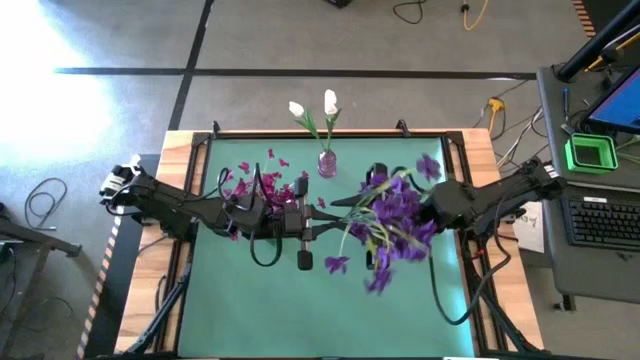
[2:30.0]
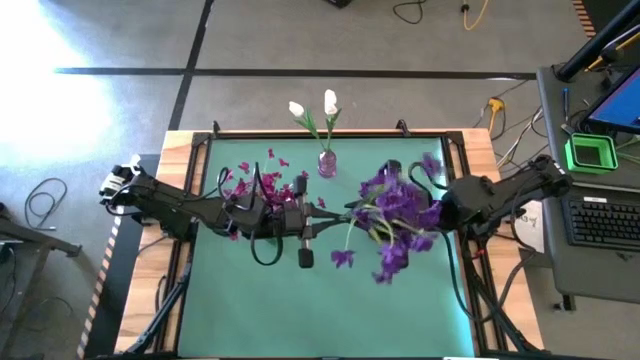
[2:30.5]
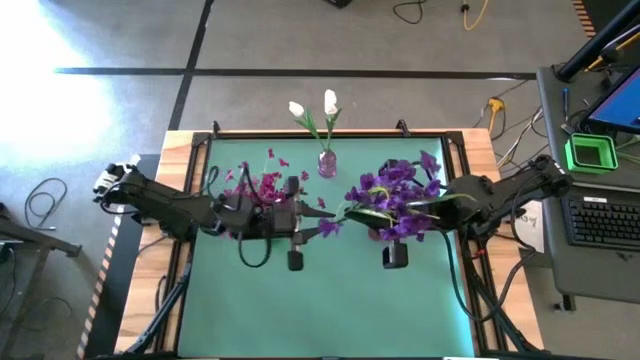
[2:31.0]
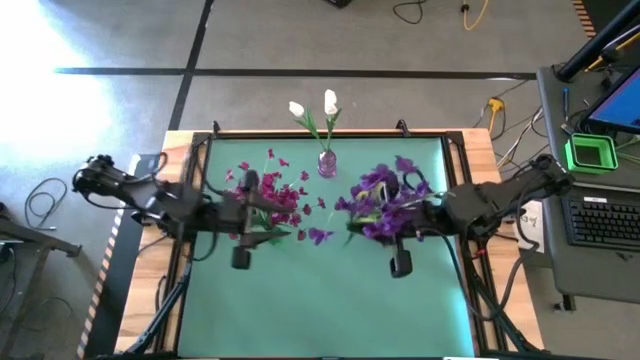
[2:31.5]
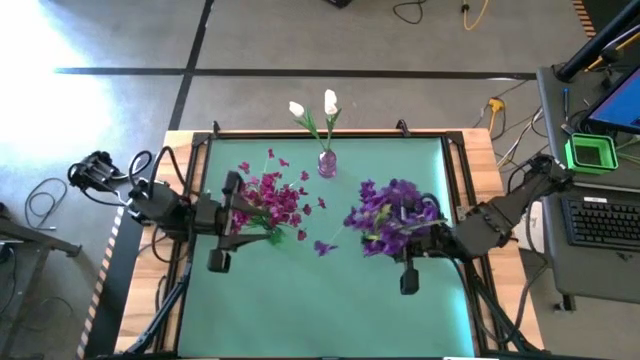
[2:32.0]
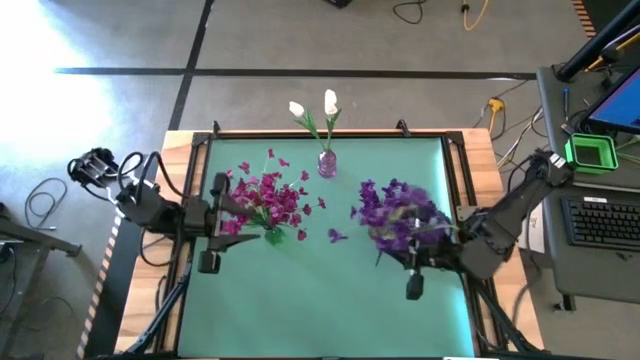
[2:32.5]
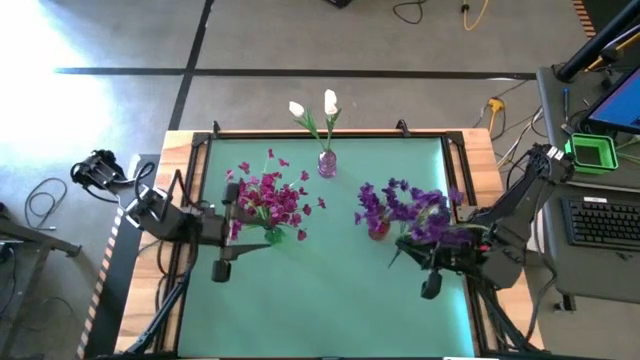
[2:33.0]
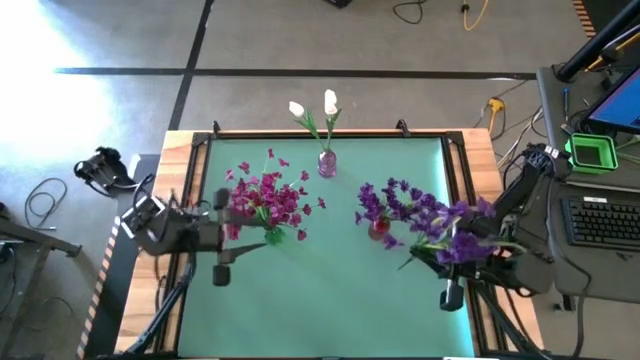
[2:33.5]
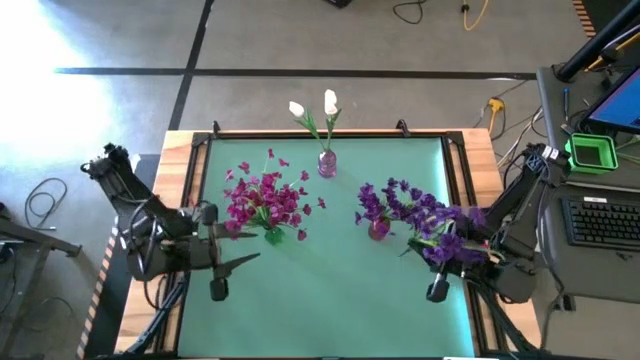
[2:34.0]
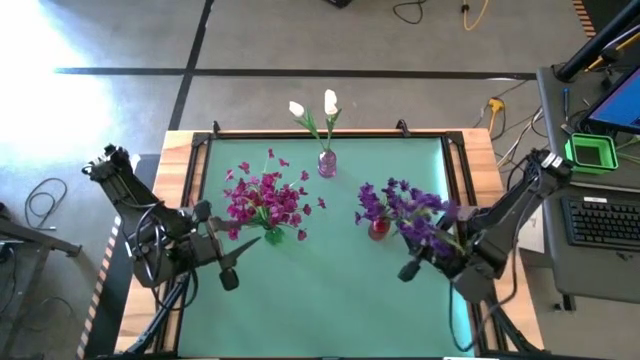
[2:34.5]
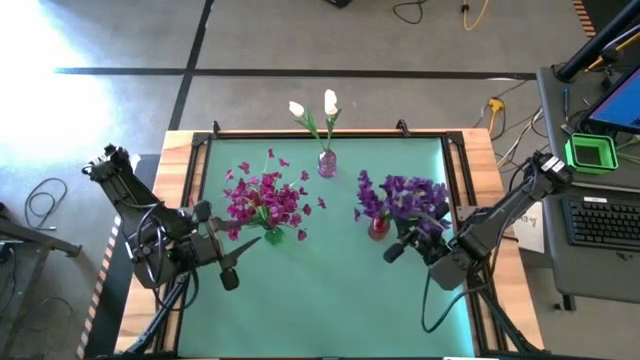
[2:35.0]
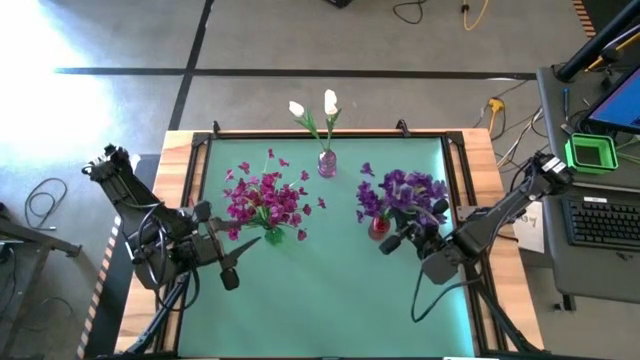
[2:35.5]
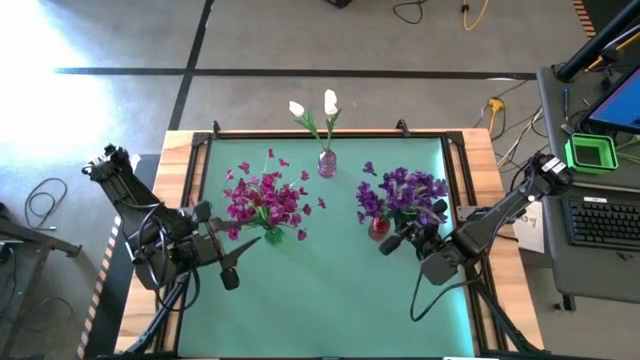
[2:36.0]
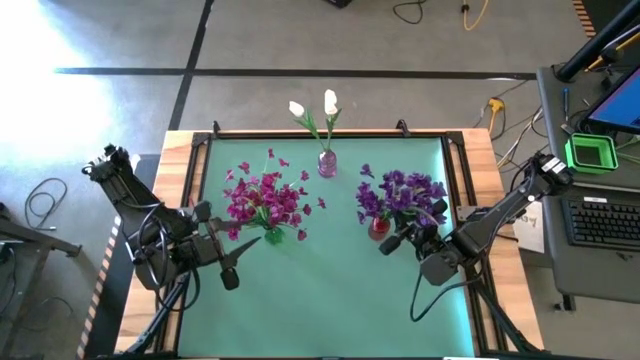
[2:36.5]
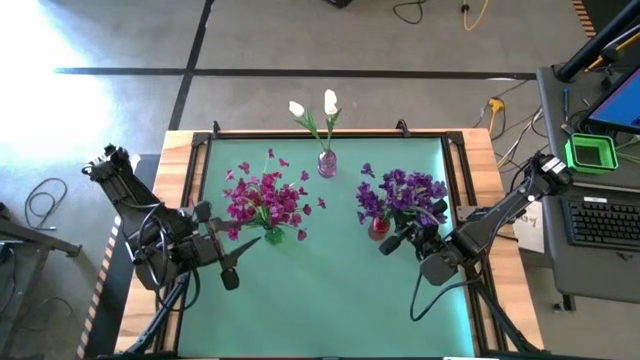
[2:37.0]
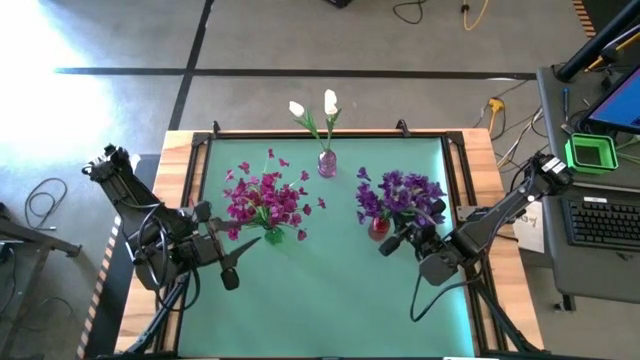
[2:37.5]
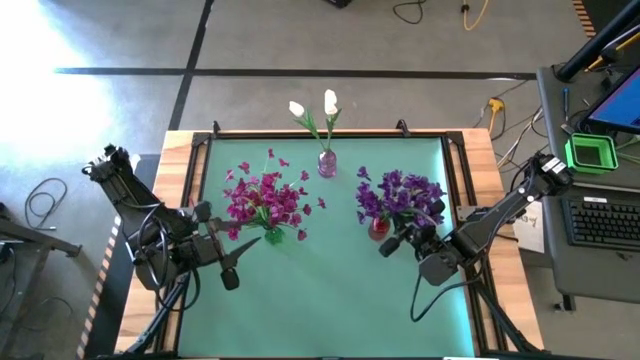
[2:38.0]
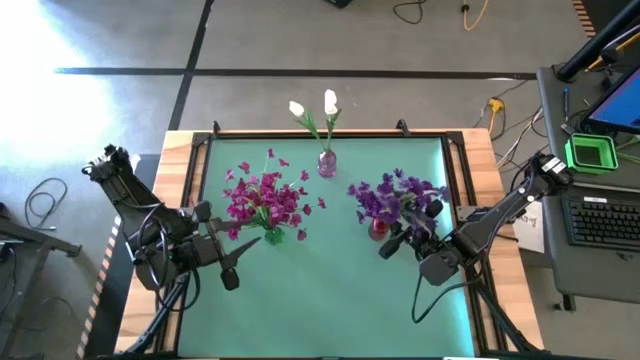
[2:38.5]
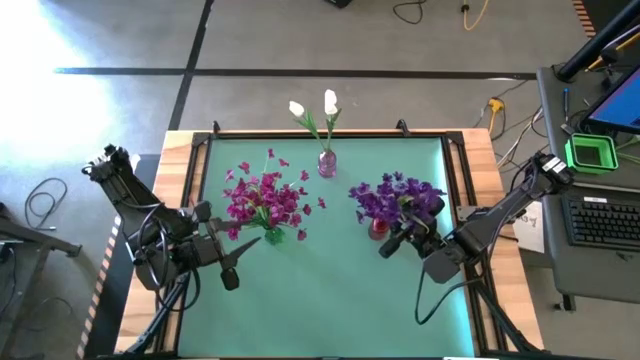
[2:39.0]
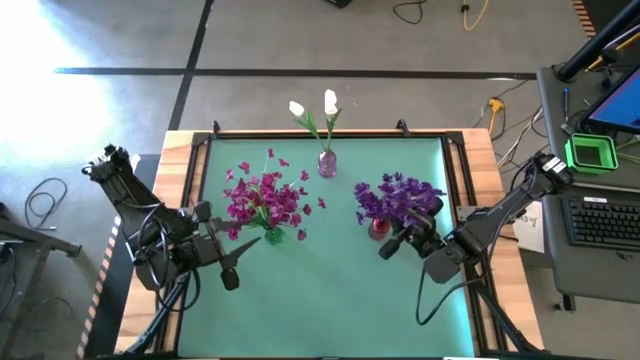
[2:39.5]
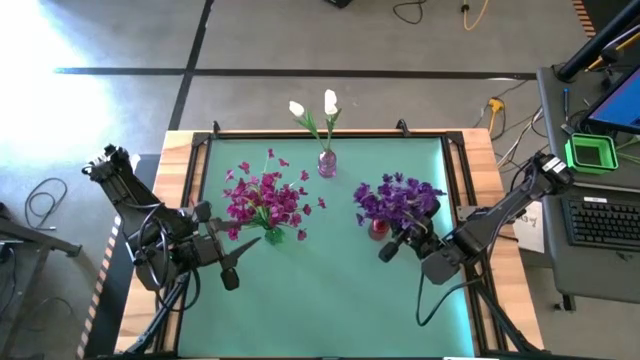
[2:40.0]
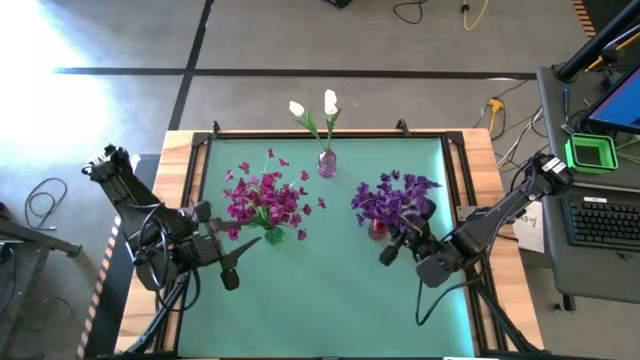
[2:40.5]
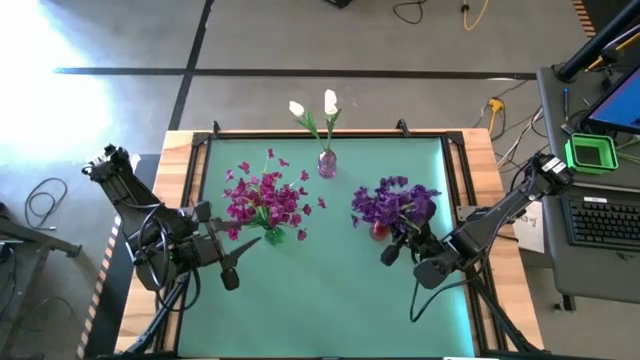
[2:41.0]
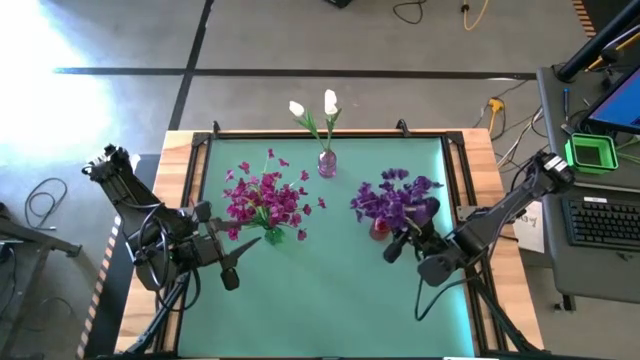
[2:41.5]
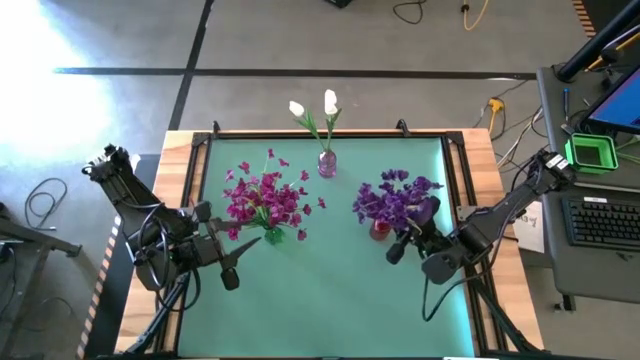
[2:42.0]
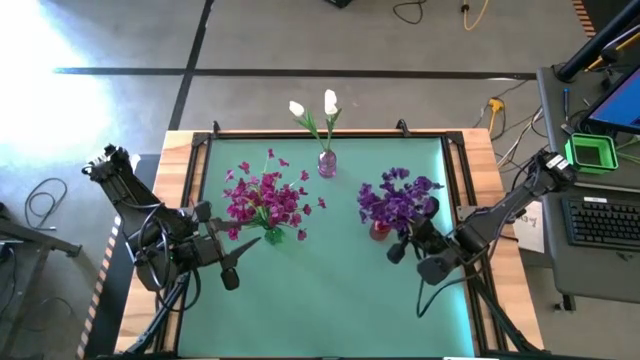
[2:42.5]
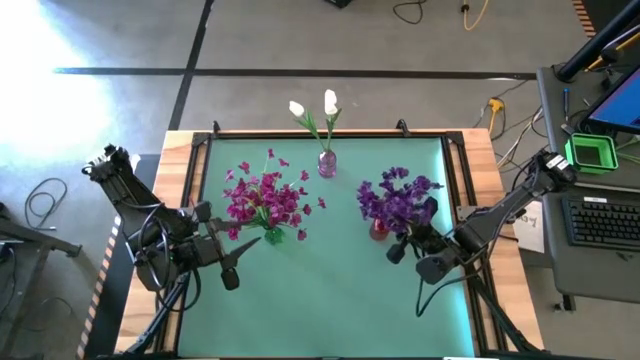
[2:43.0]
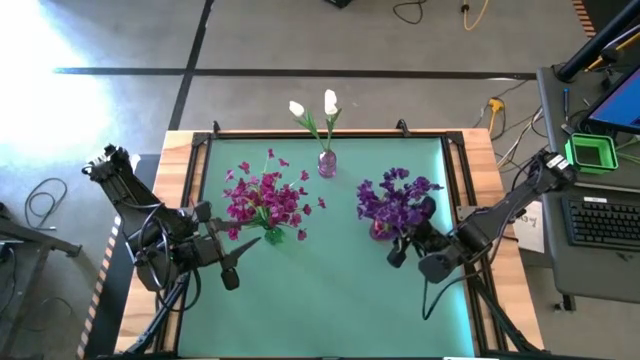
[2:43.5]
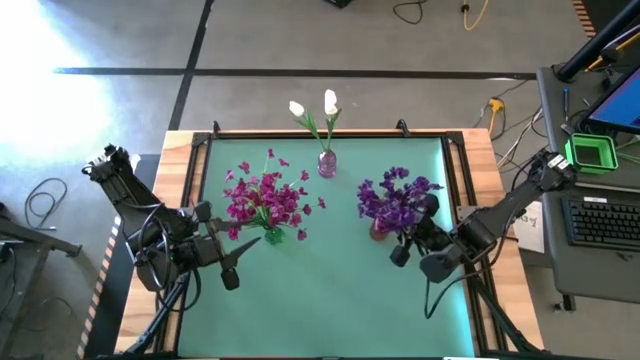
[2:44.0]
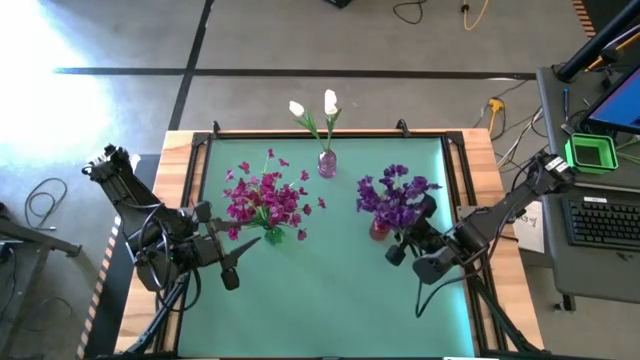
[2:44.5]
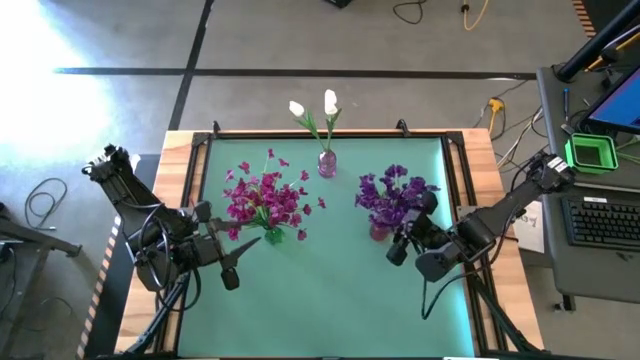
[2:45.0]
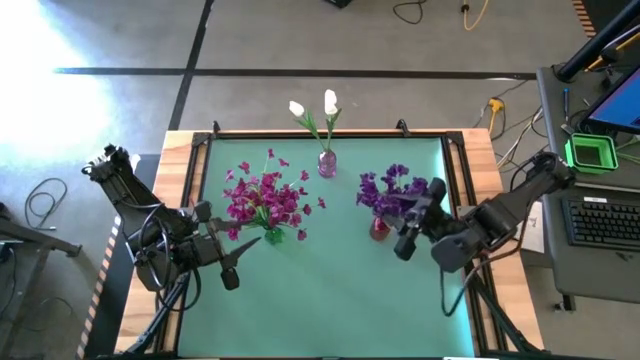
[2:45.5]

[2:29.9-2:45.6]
Task: Sort flowers into vase by color
Put the violet flowers into the red flower vase

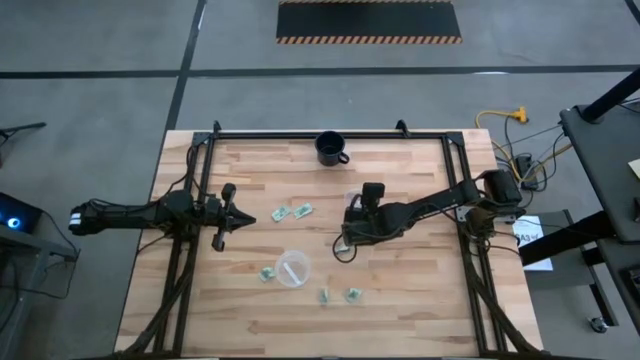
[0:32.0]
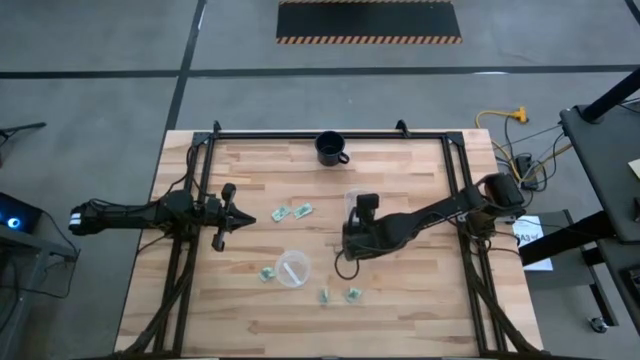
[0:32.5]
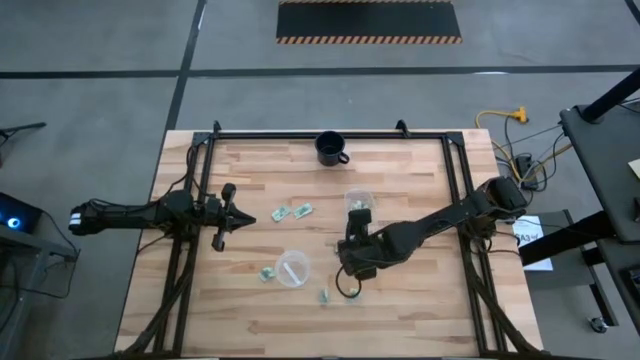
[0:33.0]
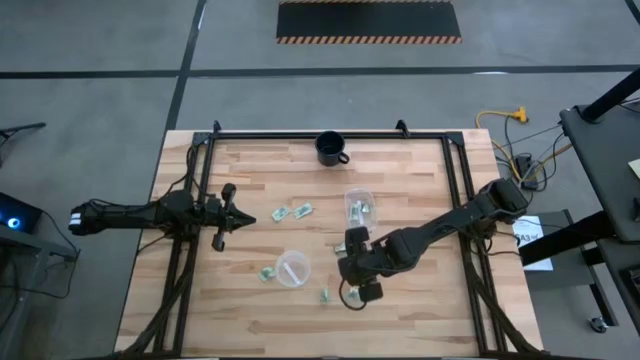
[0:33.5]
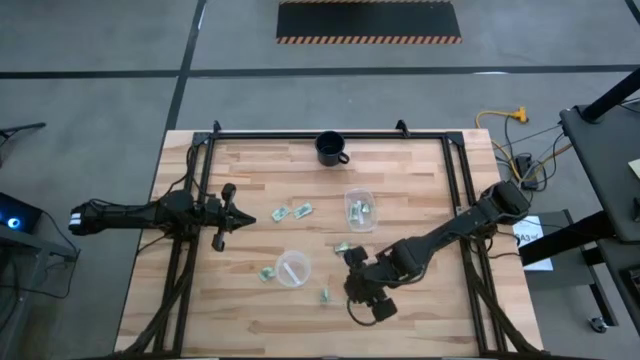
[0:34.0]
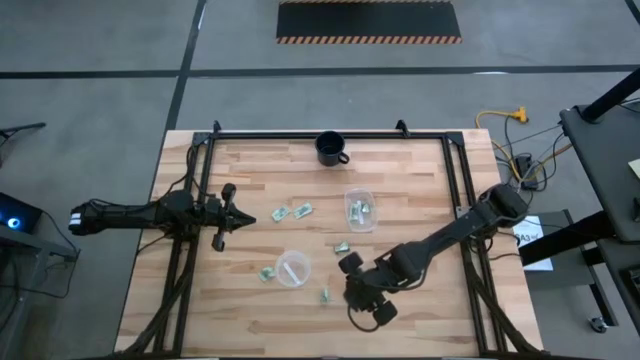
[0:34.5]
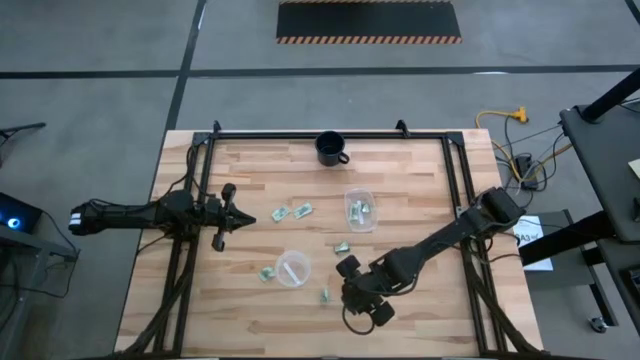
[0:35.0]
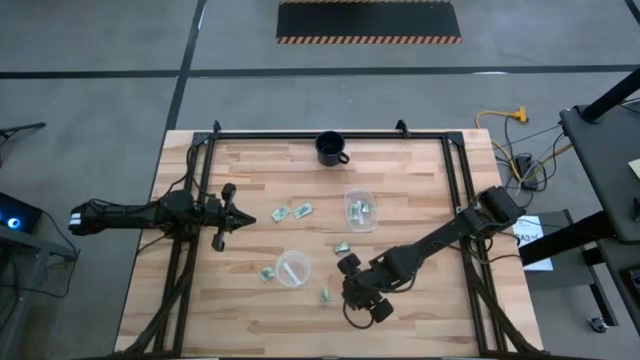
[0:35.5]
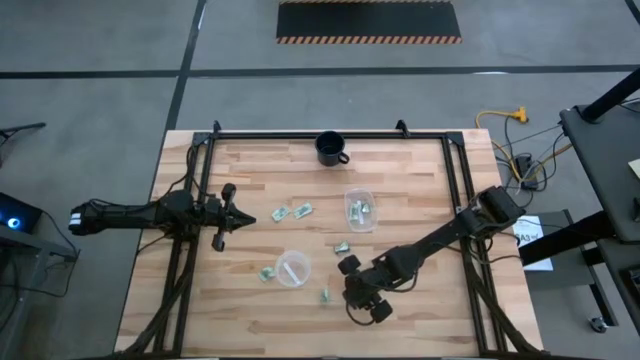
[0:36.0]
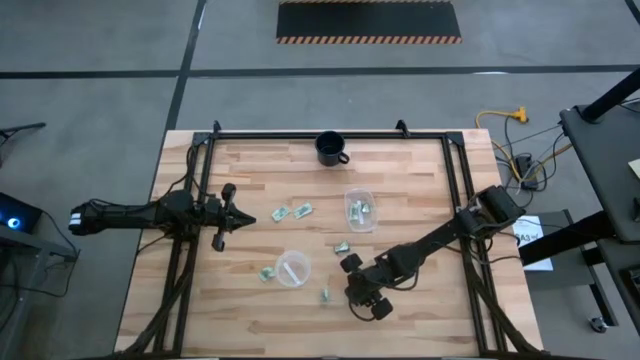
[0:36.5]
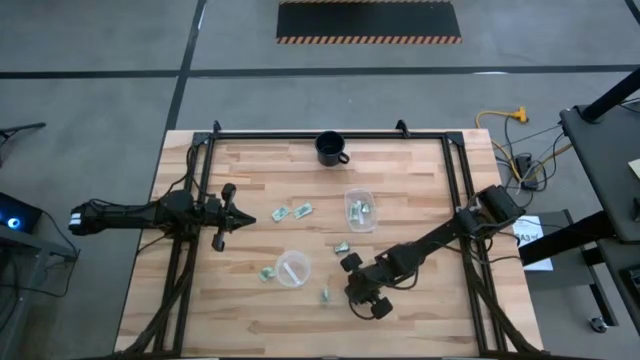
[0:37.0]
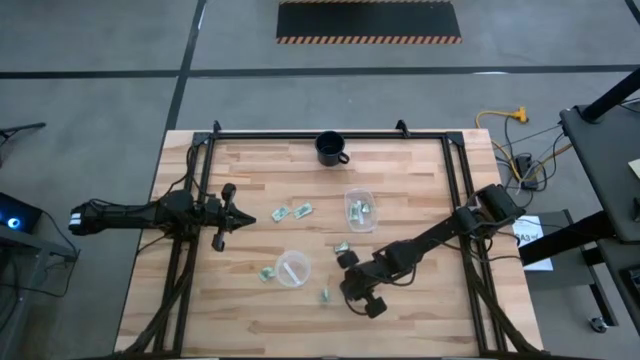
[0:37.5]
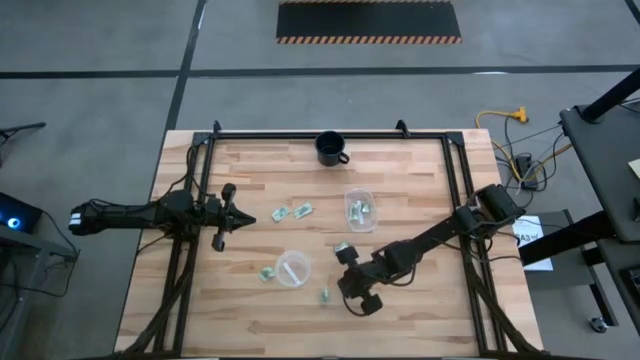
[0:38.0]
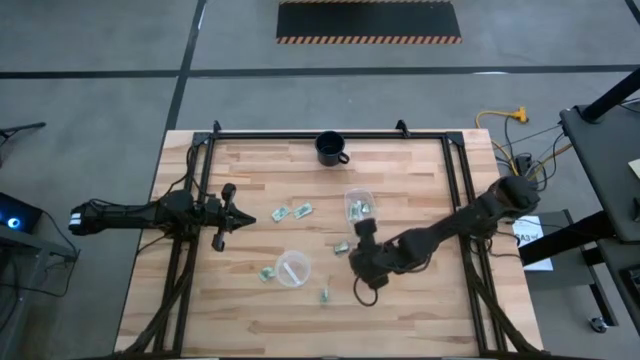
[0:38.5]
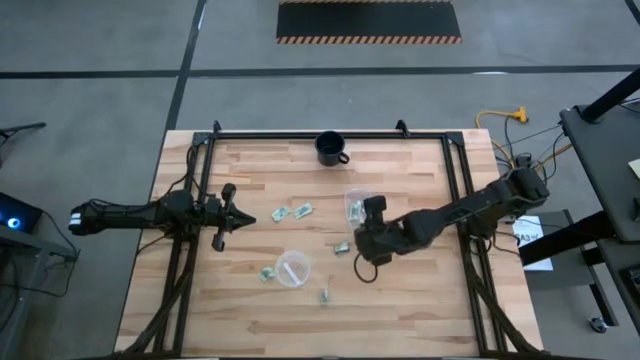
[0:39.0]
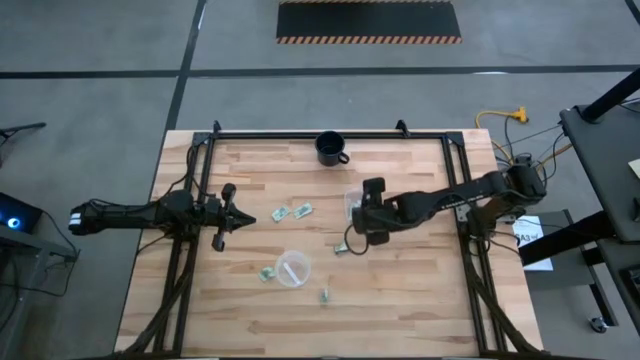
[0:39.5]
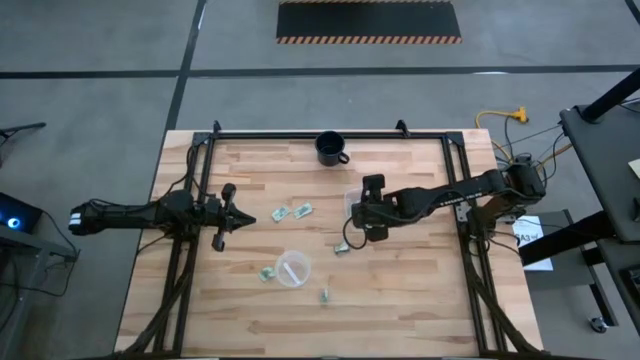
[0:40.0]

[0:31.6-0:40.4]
Task: Pick and place items into bin
Put the white stevia packet into the right transparent bin
